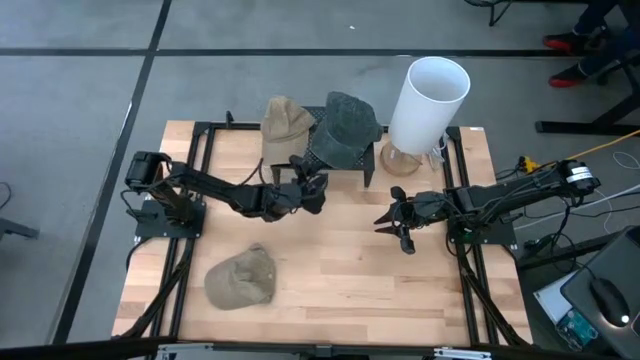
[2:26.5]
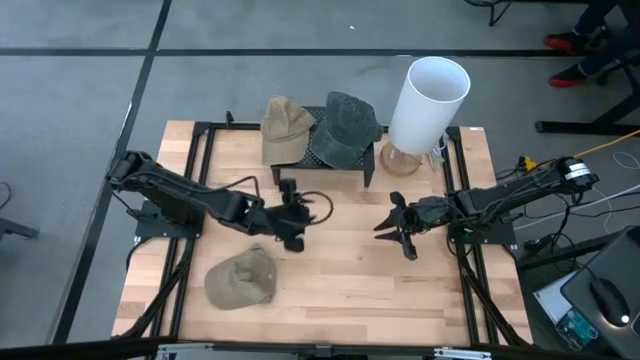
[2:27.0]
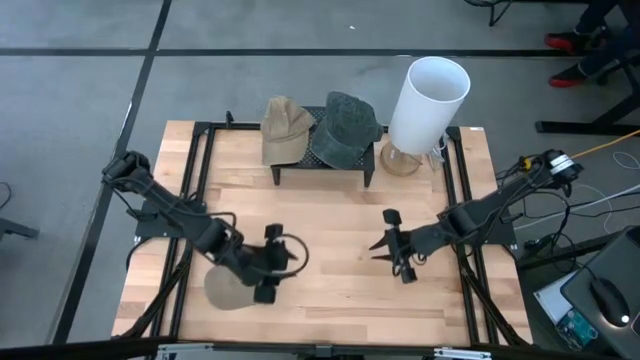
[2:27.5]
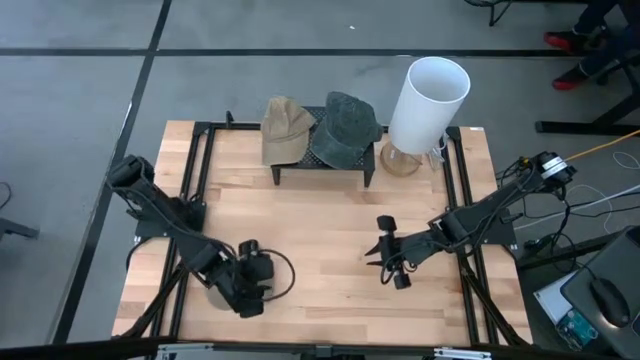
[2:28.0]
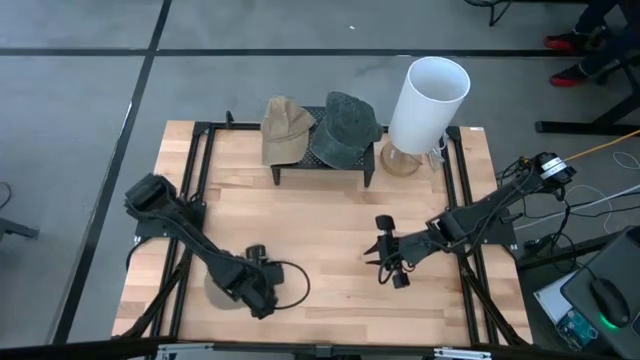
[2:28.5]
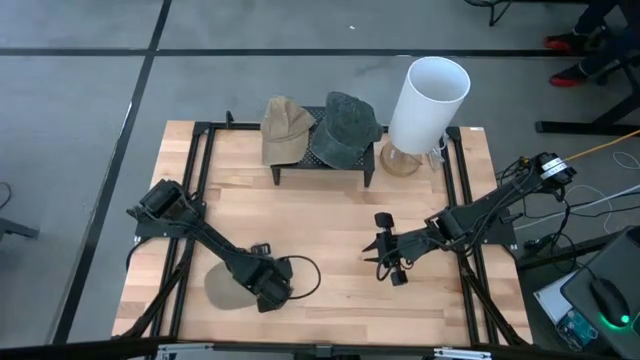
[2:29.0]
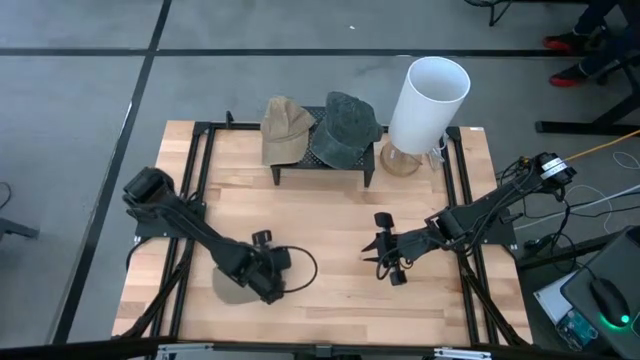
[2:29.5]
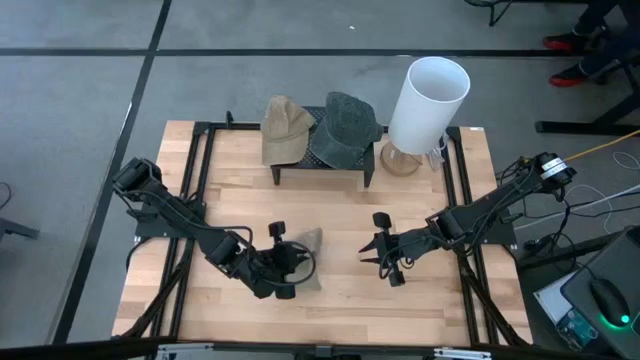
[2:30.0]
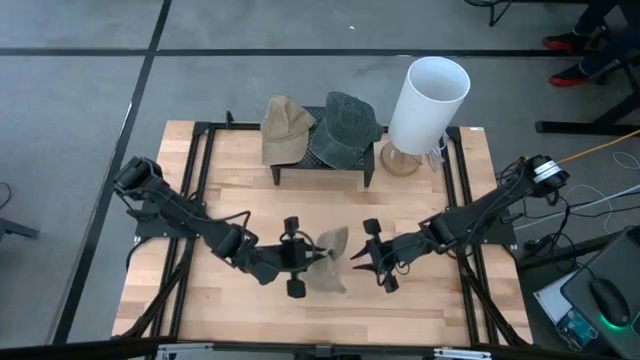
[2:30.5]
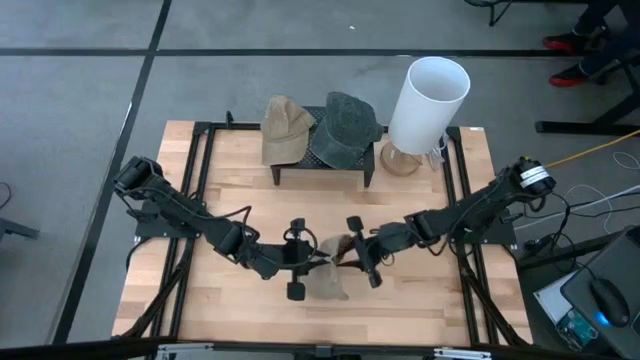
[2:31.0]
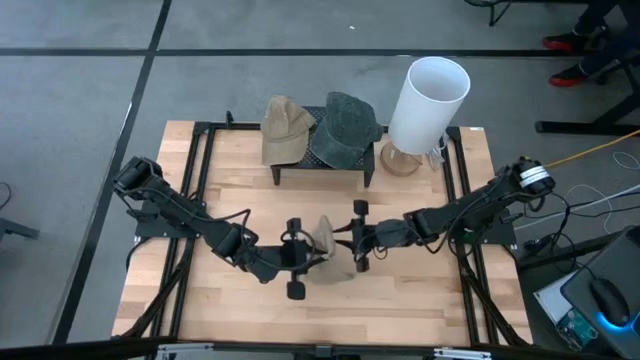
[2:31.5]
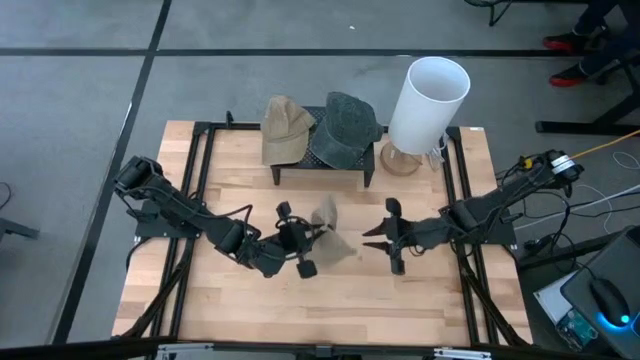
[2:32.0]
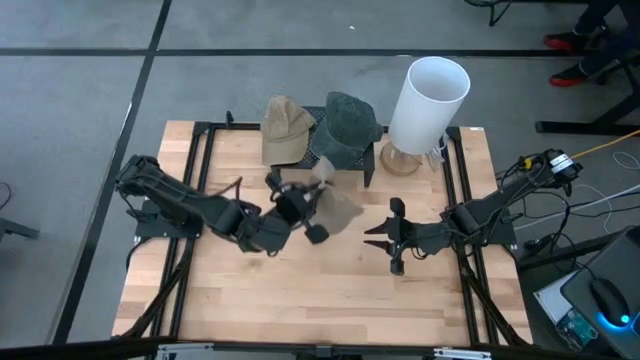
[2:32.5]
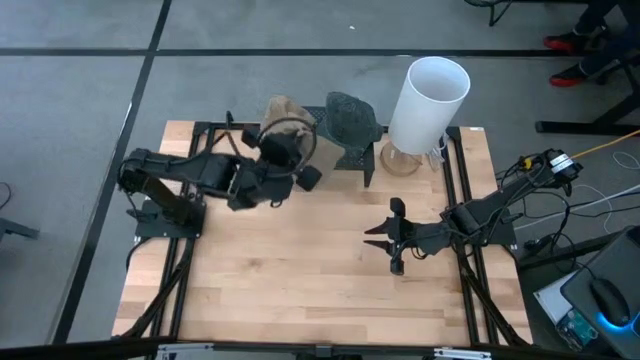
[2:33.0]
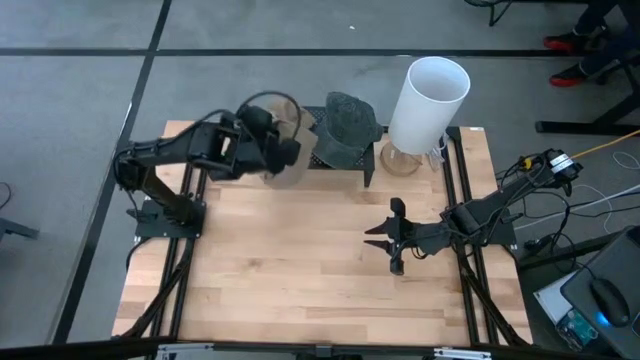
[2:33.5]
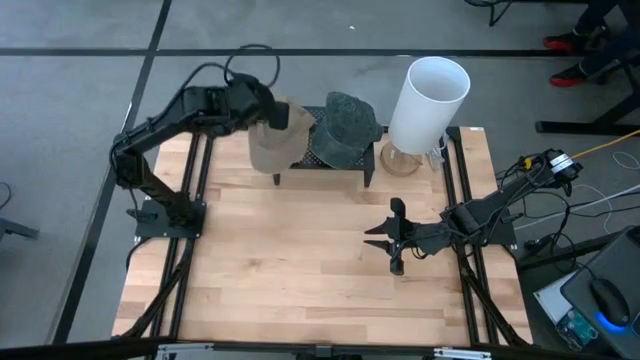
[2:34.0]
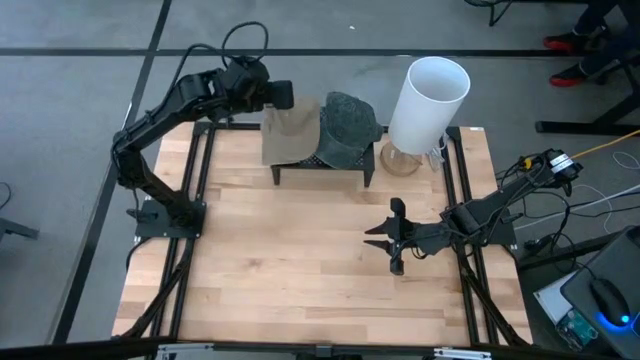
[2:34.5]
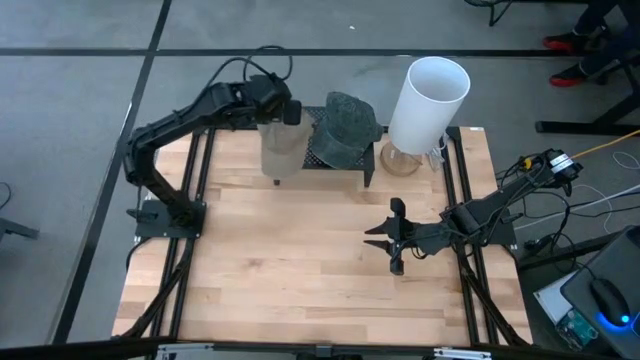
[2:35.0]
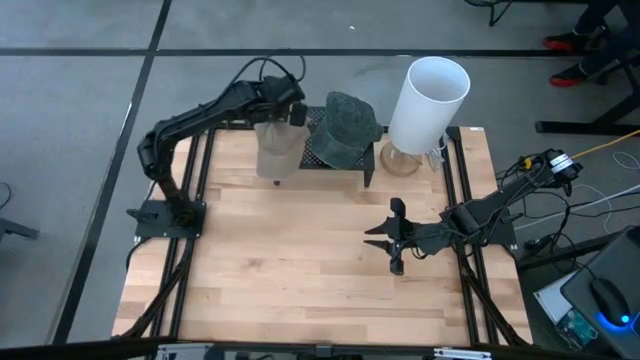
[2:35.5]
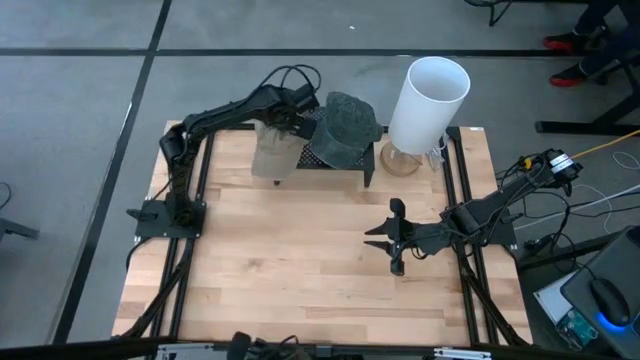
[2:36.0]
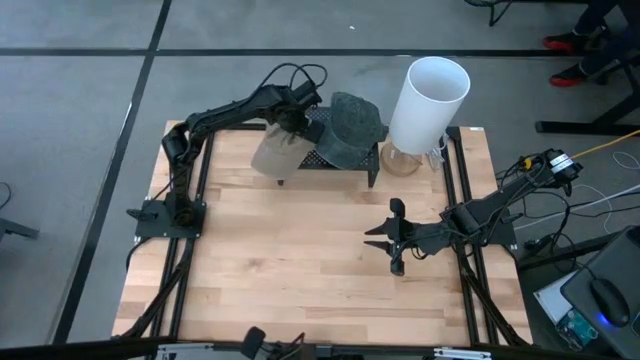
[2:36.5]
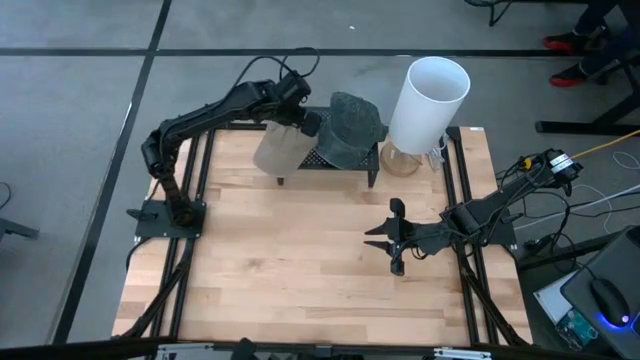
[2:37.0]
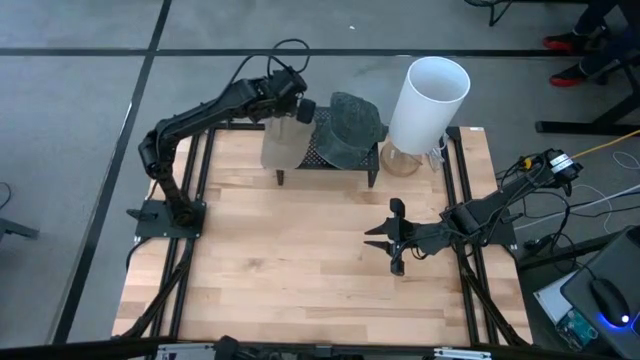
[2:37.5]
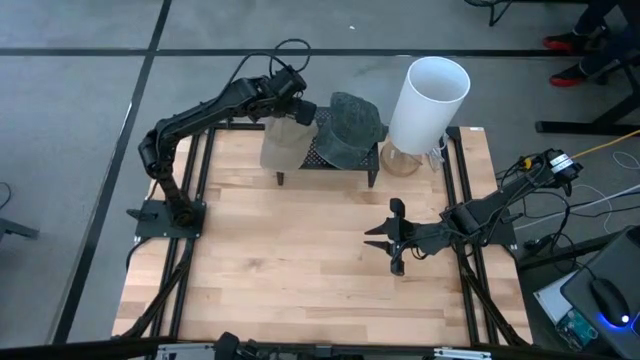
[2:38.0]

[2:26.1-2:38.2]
Task: Pick & Place hat
Stack the brown cap on top of the other brown cap on the shelf

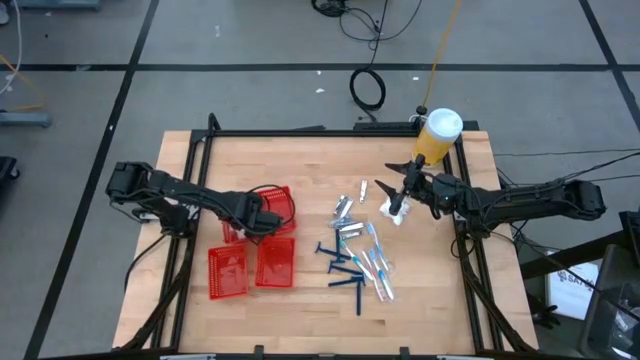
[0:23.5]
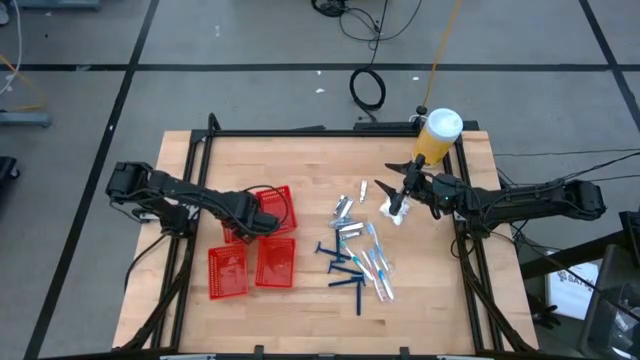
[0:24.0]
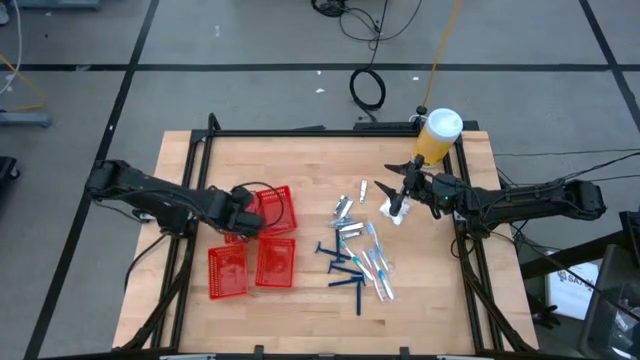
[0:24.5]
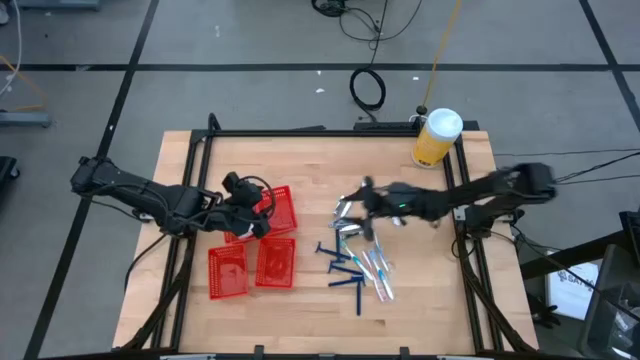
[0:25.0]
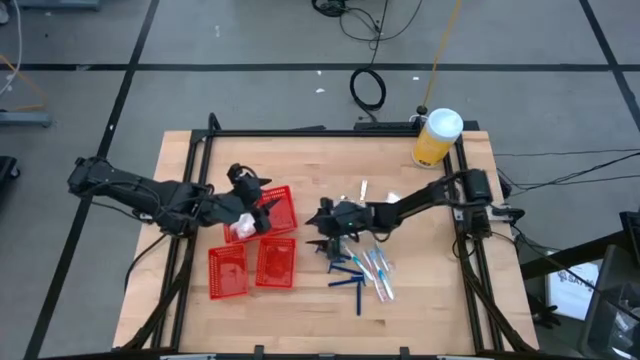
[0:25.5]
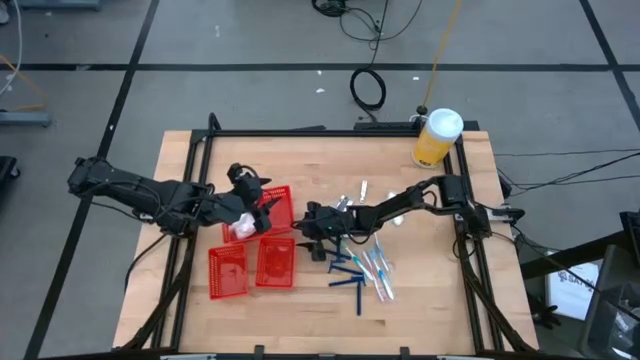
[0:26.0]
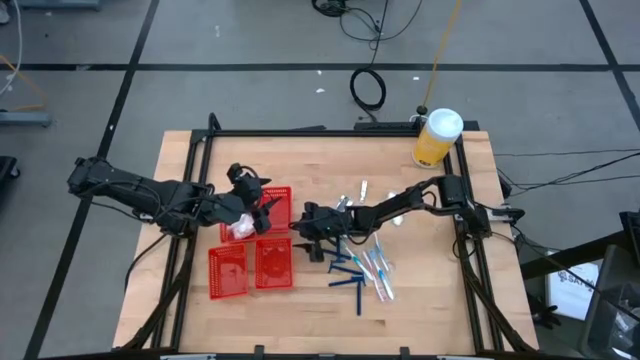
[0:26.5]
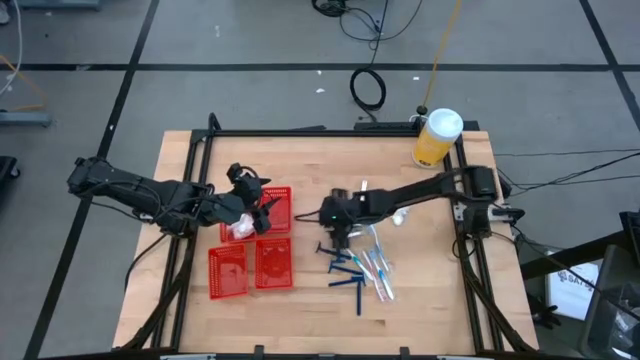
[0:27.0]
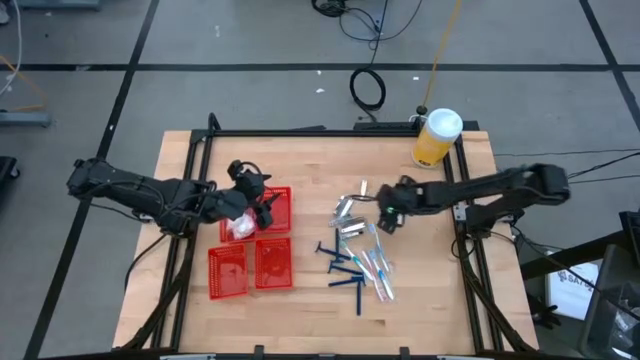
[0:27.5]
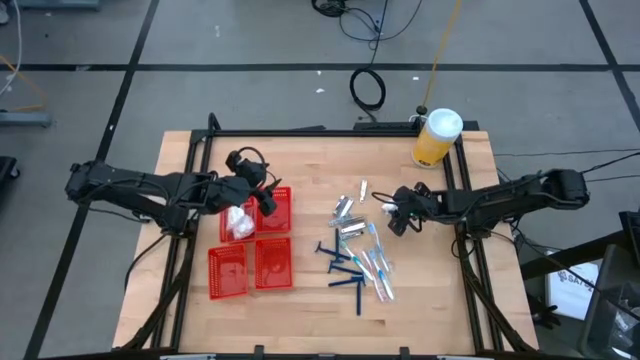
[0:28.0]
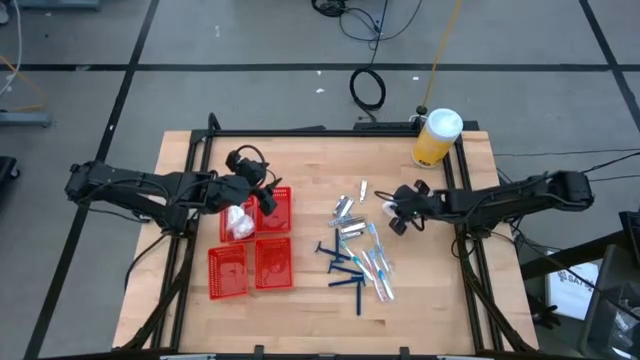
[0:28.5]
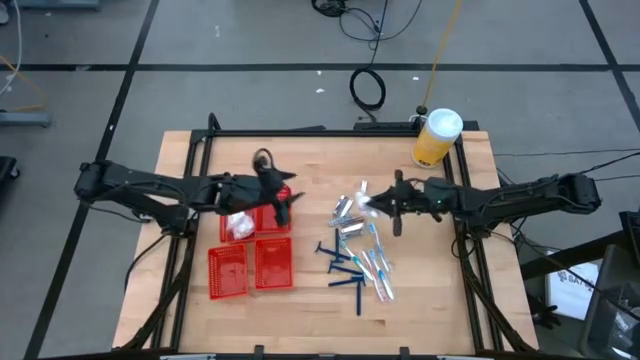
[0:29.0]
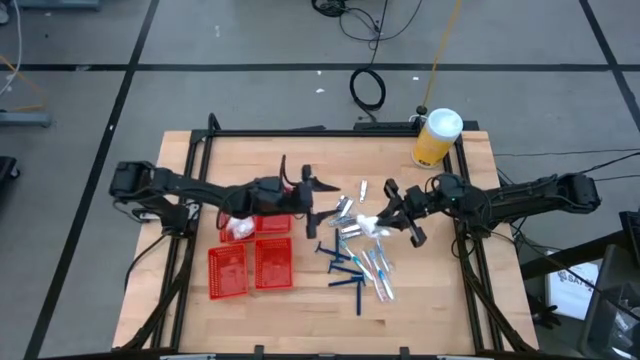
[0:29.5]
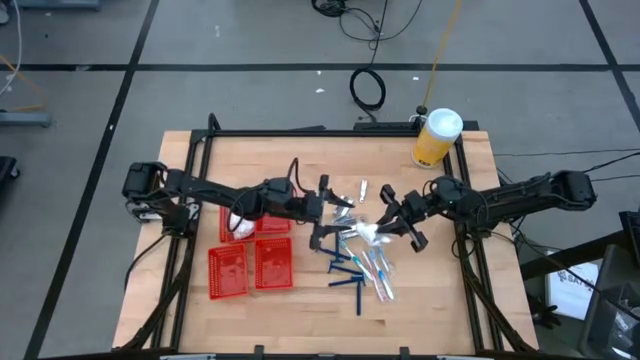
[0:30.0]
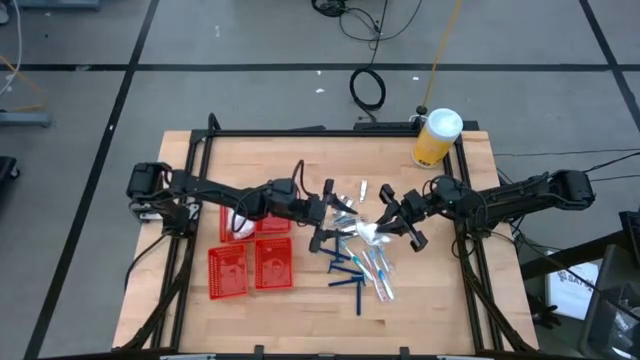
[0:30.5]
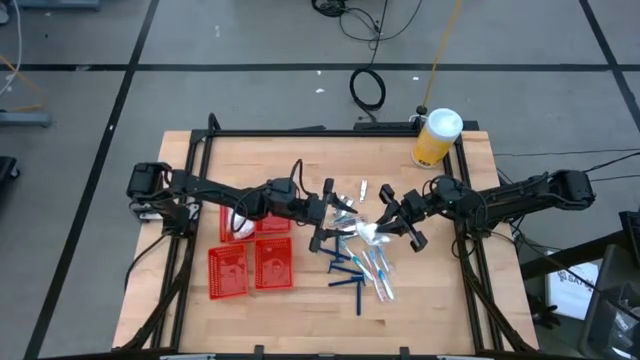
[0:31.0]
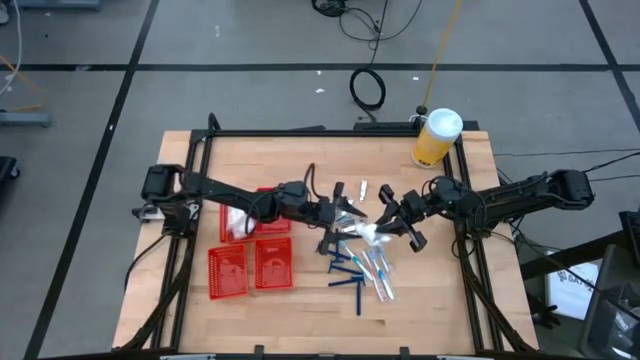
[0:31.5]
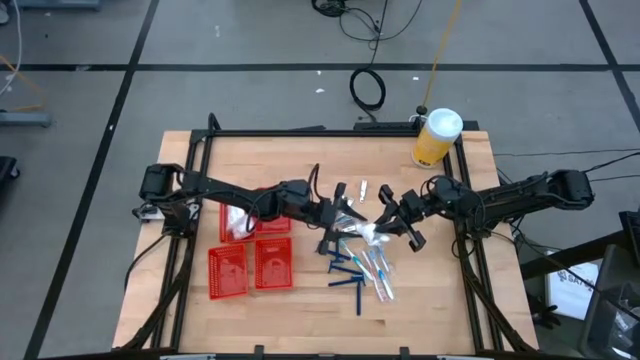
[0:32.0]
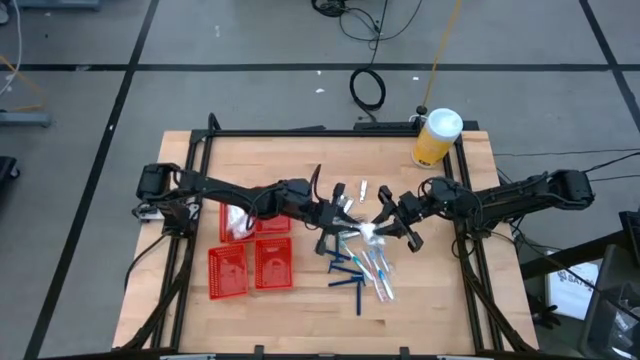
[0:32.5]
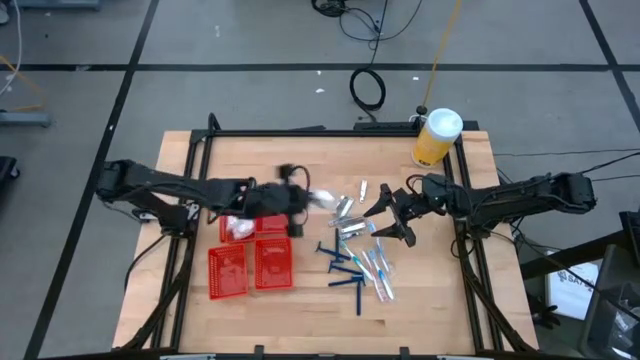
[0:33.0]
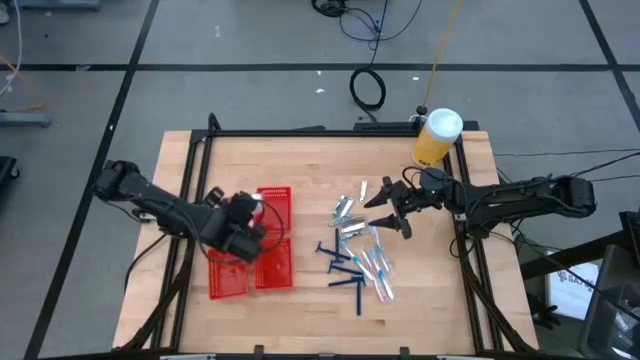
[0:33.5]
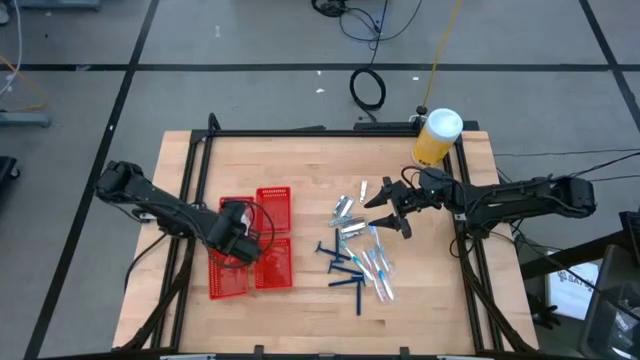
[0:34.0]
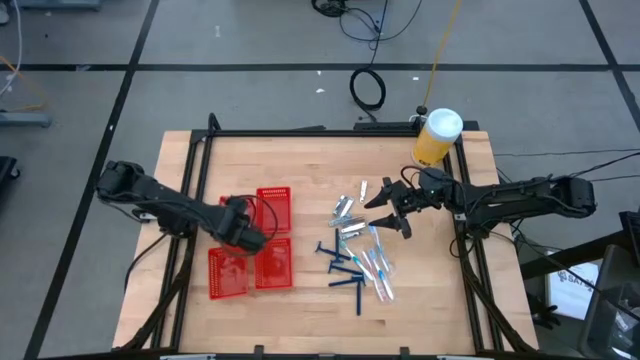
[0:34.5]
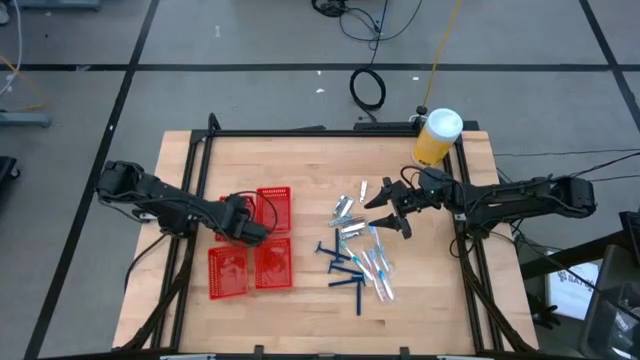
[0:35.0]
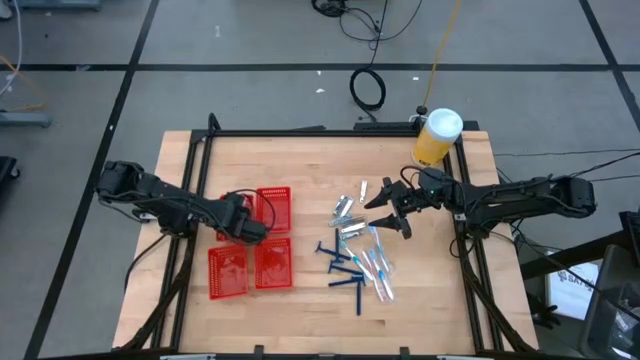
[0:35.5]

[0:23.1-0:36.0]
Task: Pick & Place Travel size toiletries
Put the transparent cotton pack into the top left red basket
